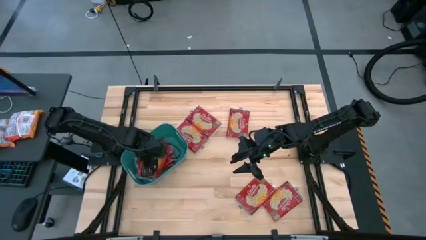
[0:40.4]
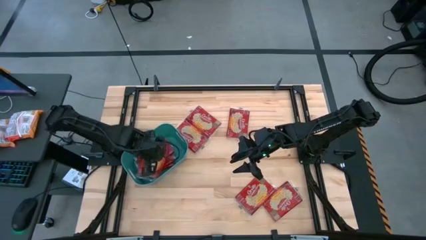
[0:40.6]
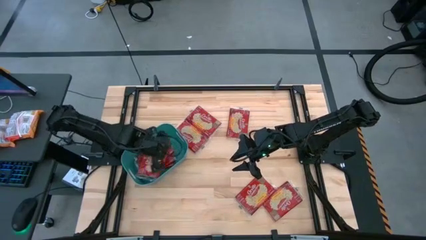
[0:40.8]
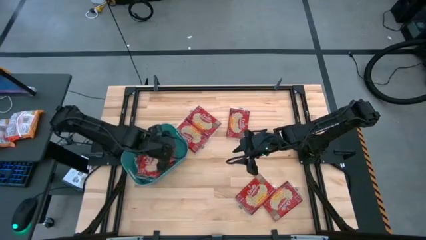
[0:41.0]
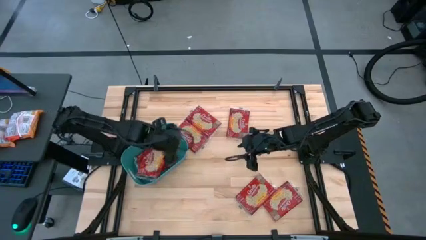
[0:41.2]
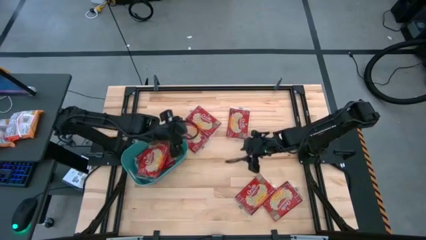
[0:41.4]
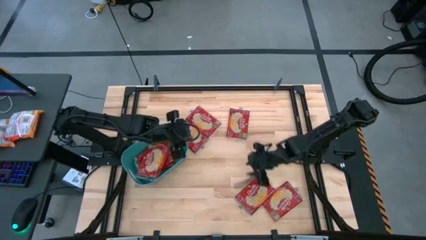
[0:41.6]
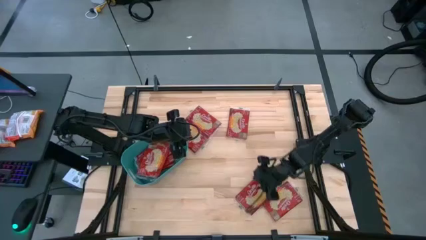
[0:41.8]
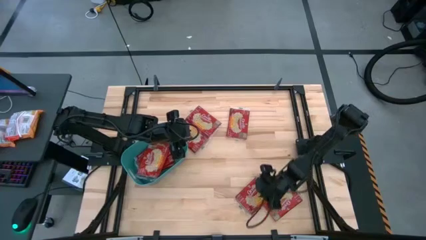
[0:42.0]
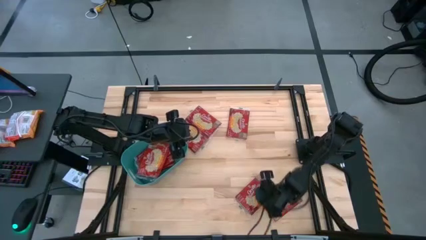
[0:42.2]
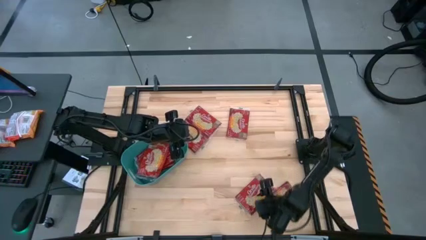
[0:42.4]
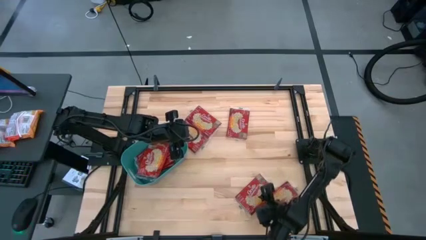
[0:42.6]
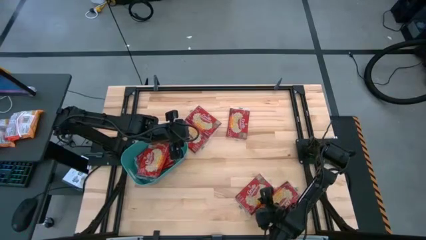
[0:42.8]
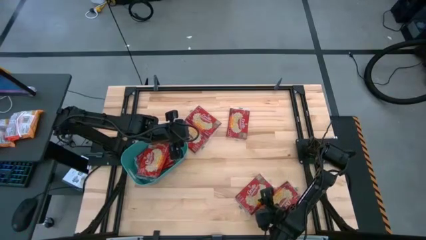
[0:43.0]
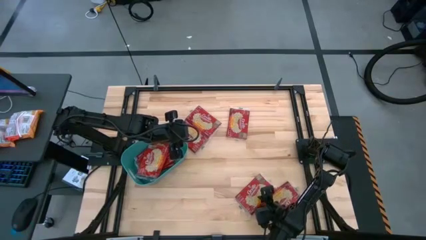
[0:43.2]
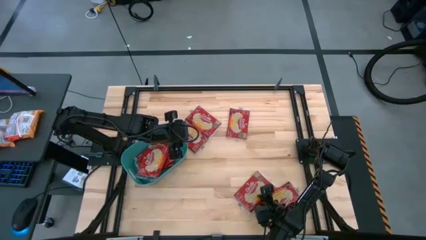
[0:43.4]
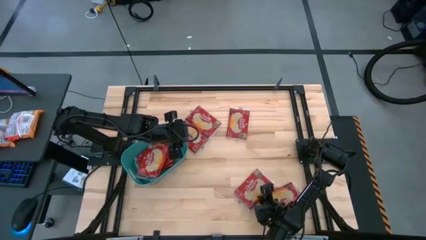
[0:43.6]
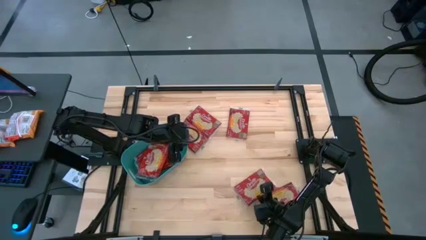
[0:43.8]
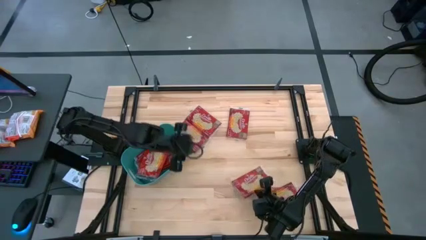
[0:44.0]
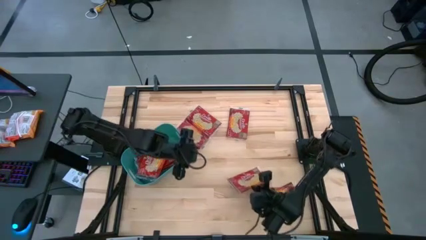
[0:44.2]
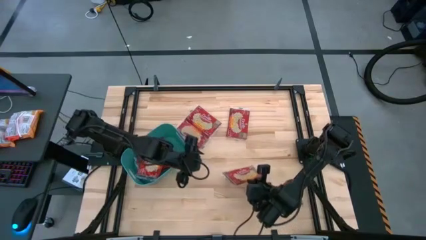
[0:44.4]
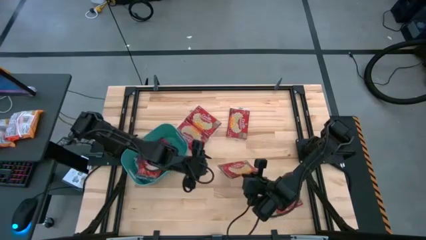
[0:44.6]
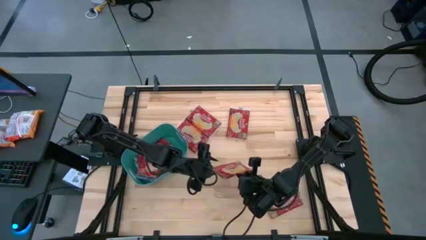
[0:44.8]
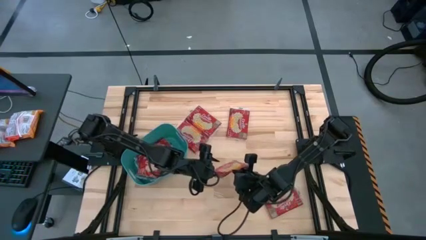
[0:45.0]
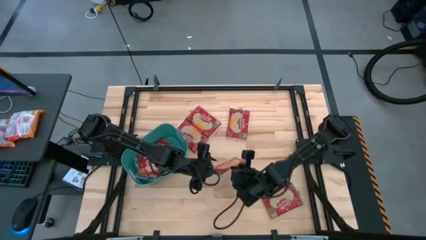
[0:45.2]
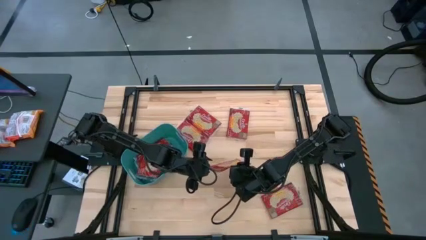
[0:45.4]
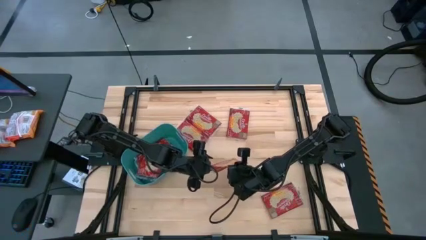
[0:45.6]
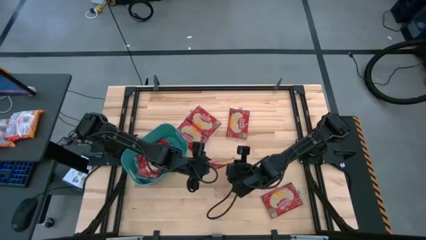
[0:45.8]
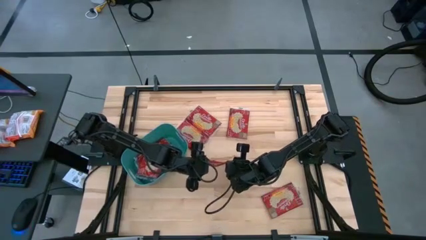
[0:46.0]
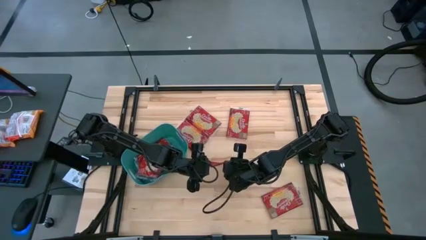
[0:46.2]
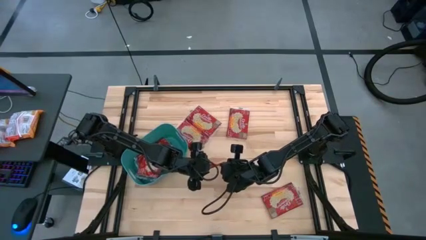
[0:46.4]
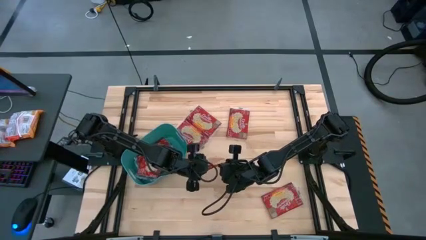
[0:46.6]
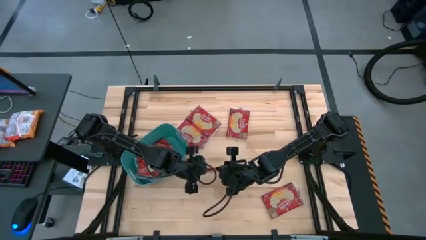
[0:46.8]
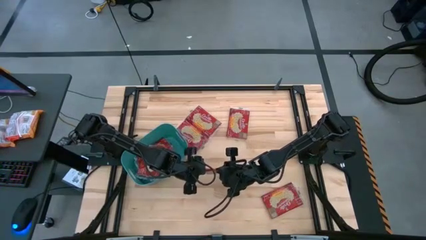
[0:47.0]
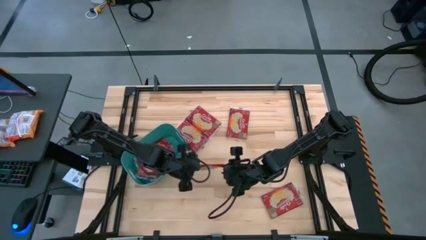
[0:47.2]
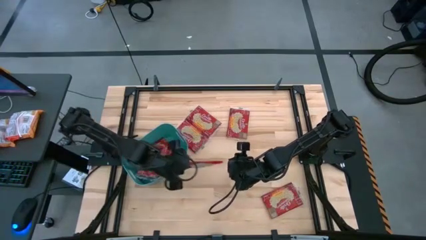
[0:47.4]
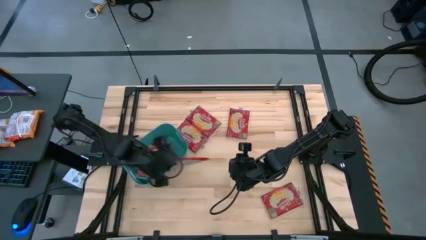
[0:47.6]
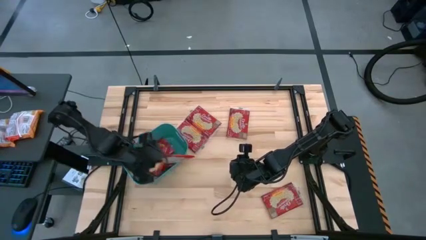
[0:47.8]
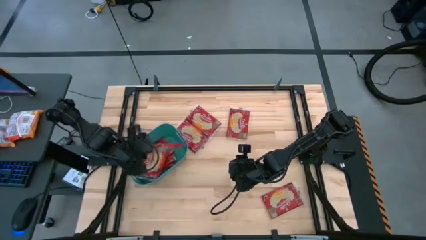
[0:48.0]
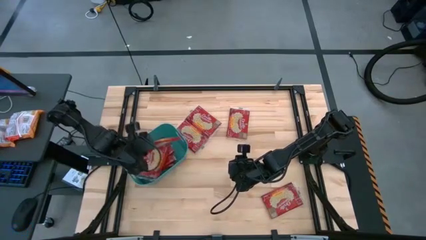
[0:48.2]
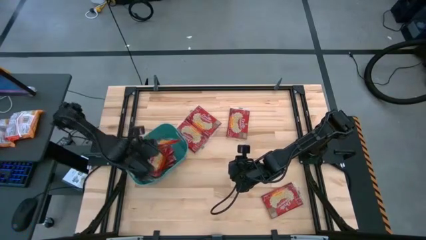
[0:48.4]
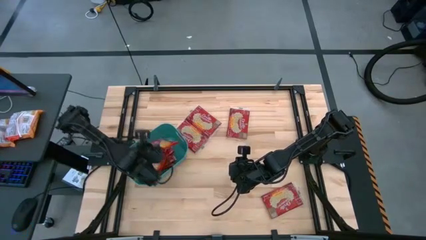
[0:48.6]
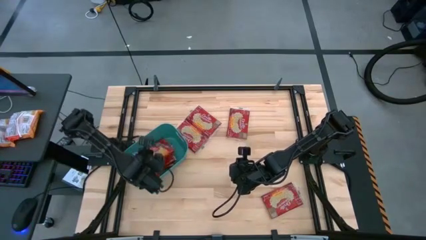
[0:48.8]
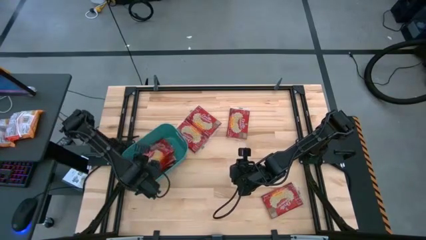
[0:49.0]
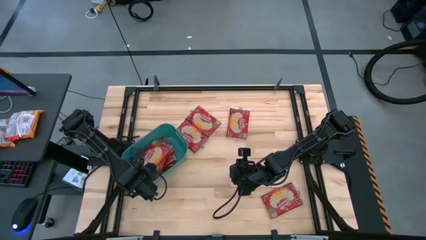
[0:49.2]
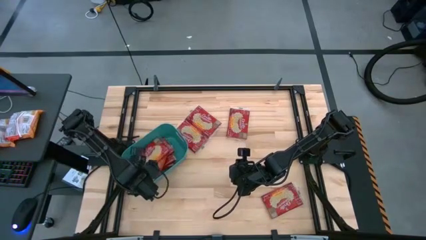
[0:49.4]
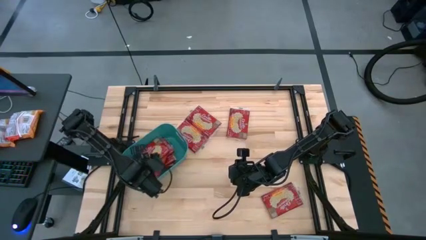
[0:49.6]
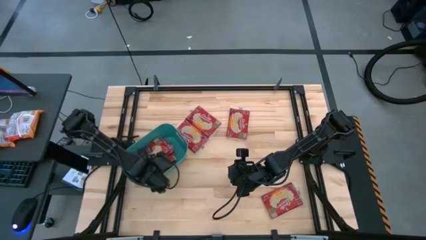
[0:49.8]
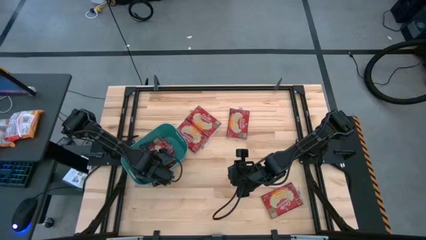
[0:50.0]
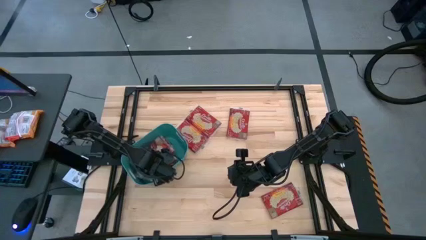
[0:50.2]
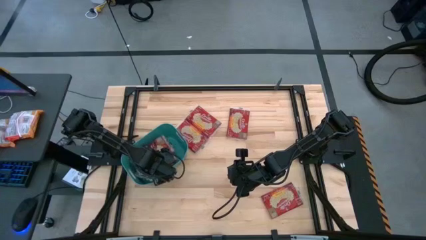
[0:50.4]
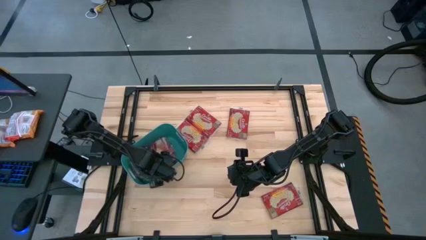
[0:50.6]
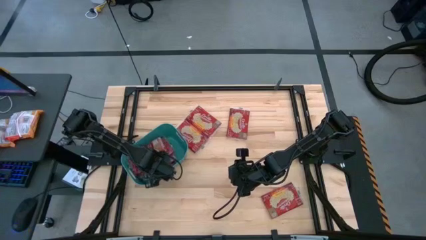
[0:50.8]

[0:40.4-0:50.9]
Task: Sort popcorn bags into baskets
Put the red popcorn bag into the green bin

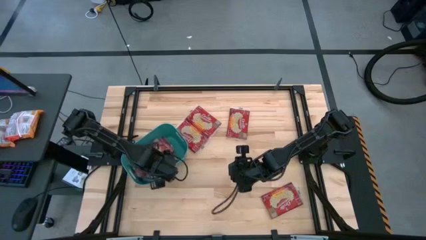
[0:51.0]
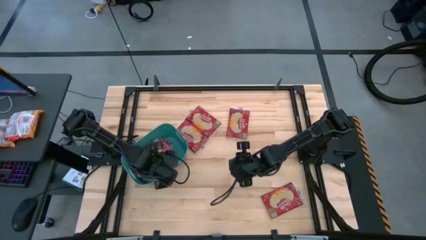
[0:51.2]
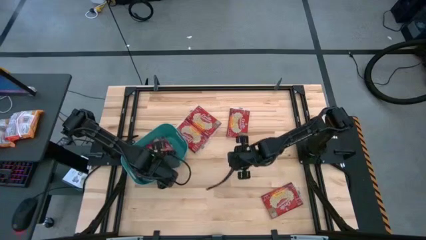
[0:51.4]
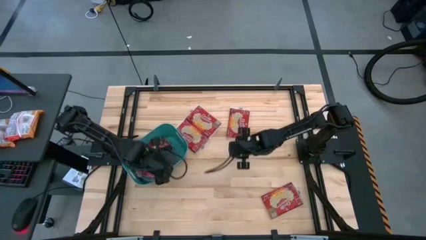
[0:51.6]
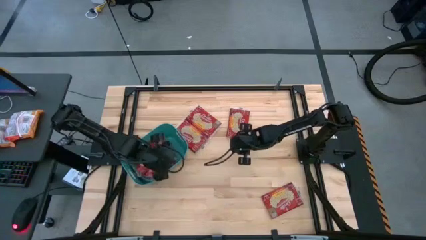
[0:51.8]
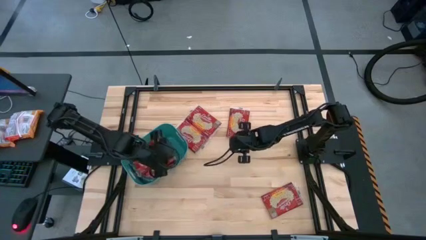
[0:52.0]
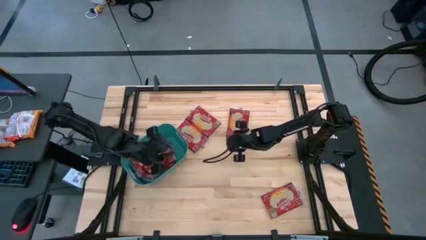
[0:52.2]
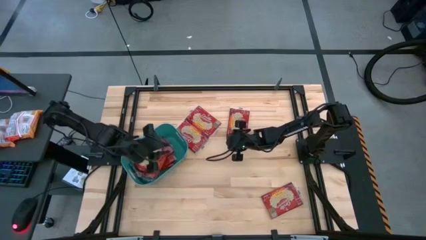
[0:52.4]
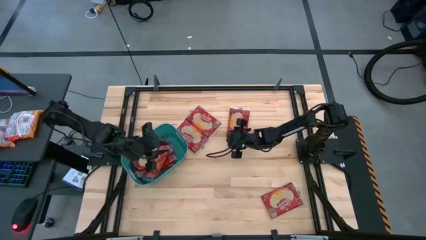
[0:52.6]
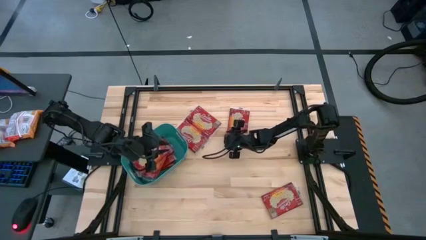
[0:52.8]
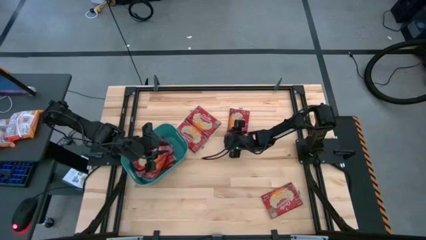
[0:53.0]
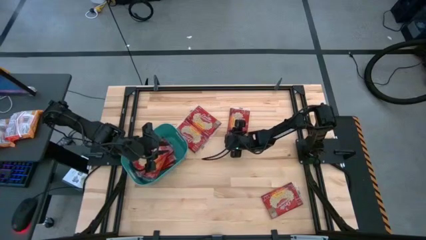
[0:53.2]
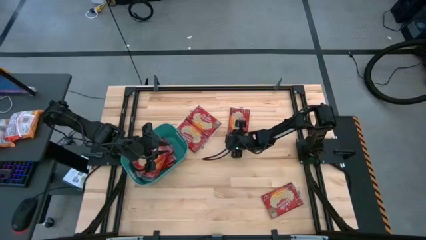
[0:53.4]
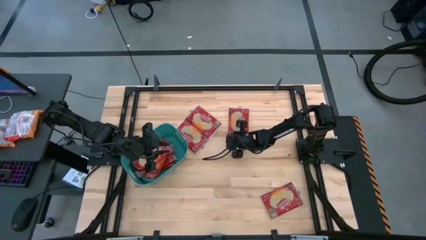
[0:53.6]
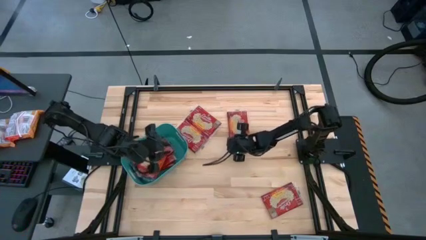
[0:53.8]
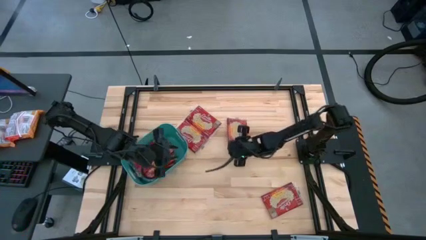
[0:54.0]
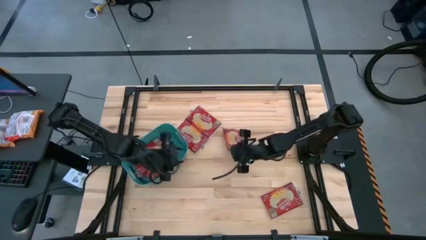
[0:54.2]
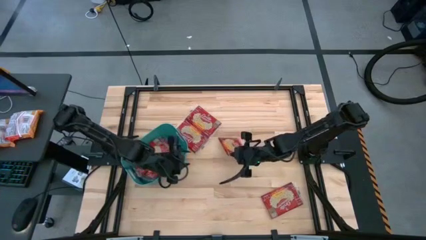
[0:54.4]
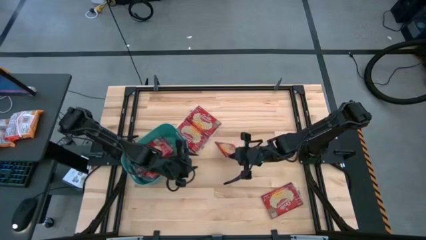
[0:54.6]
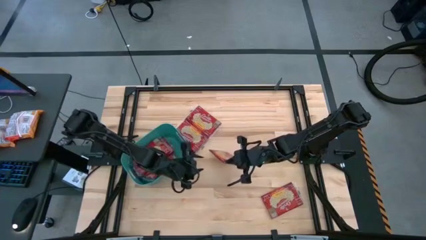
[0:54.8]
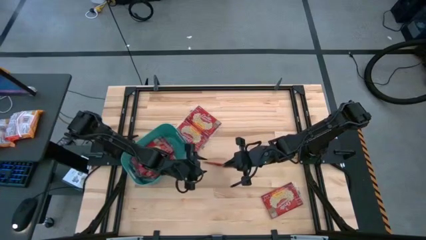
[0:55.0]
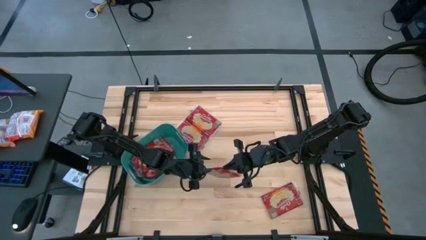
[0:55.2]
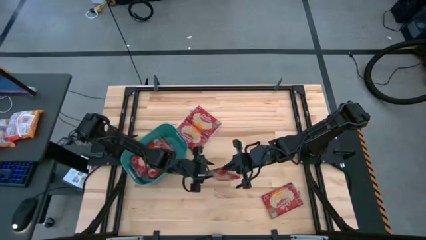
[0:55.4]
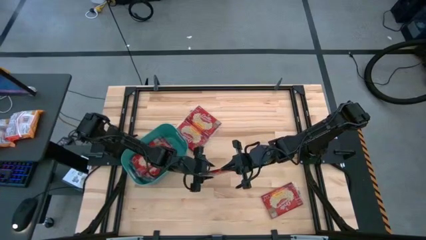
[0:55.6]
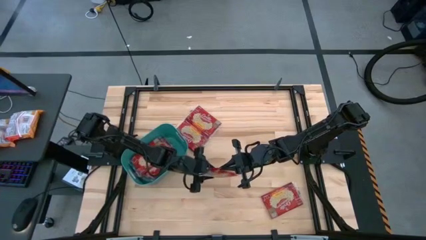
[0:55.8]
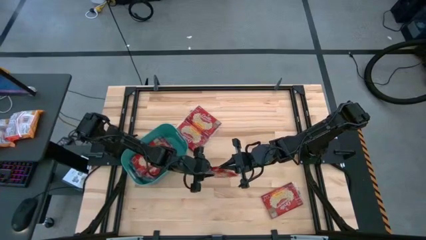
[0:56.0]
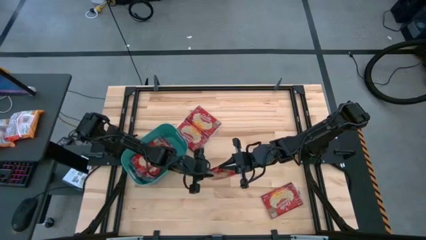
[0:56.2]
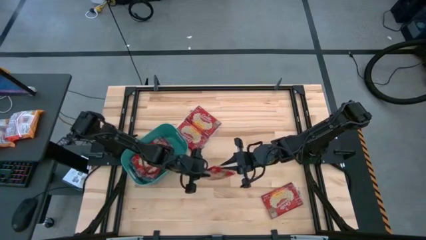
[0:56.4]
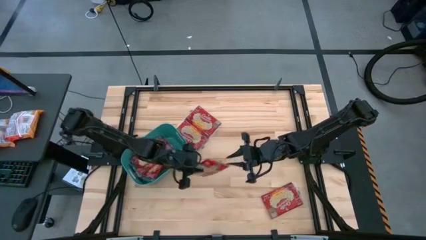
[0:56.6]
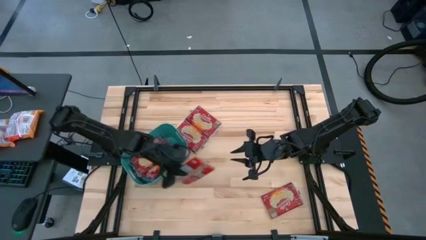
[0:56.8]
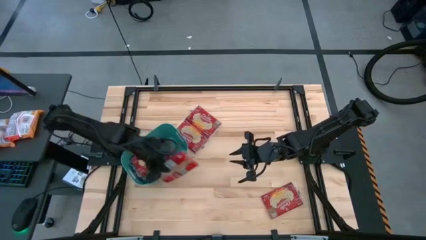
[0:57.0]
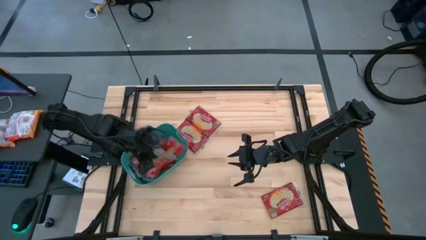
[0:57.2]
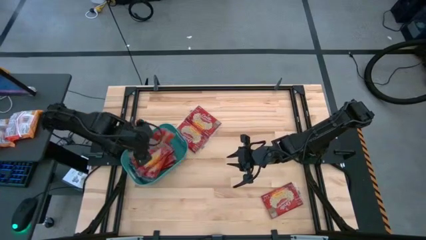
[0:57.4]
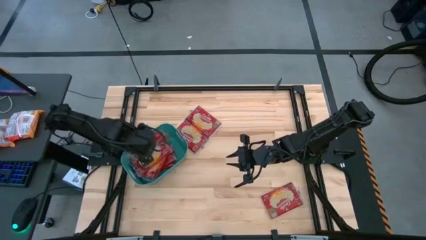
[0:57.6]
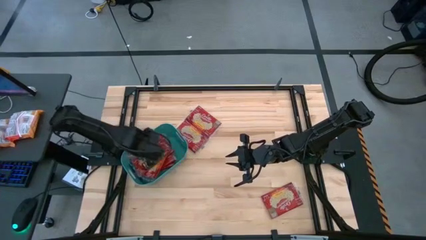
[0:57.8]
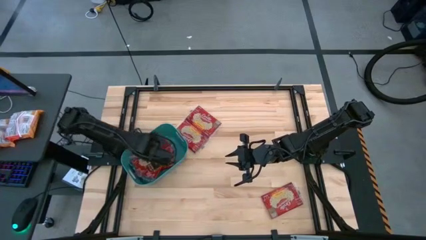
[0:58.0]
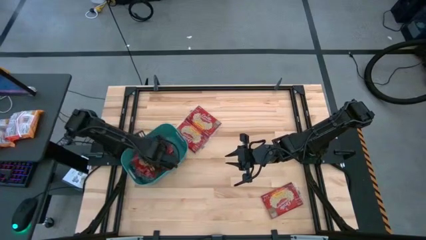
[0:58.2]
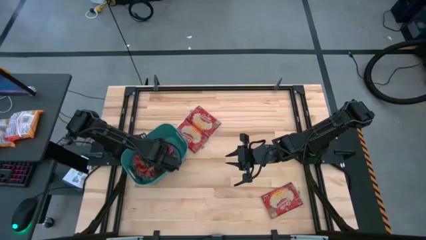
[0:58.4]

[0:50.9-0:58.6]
Put the red popcorn bag into the green bin
